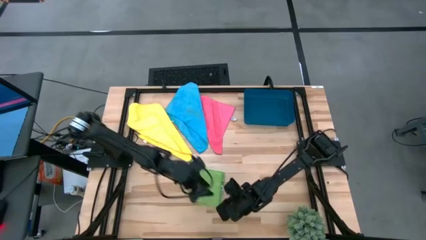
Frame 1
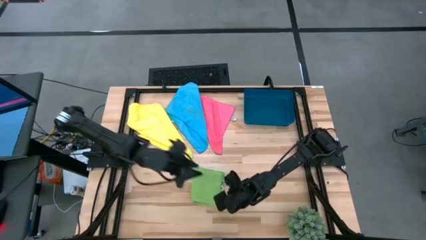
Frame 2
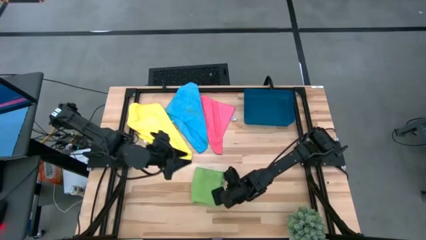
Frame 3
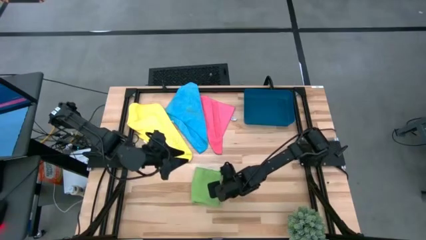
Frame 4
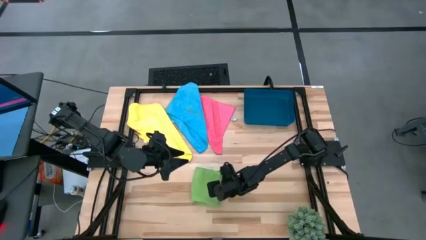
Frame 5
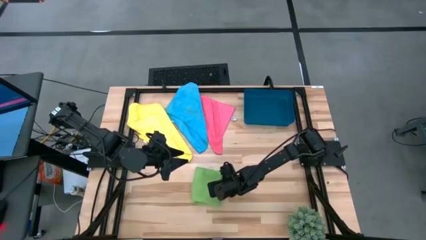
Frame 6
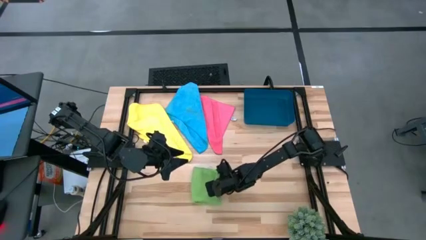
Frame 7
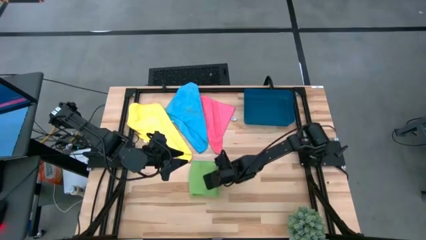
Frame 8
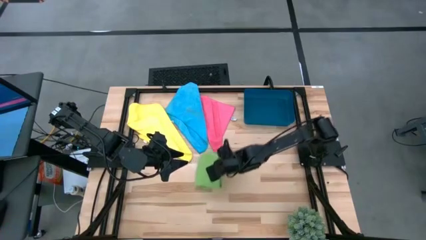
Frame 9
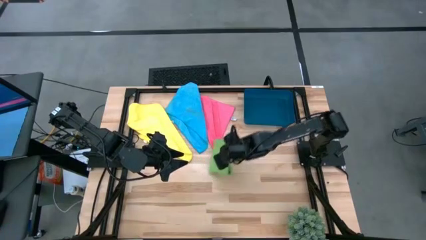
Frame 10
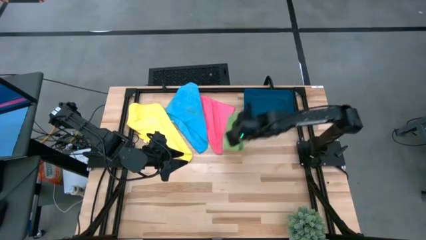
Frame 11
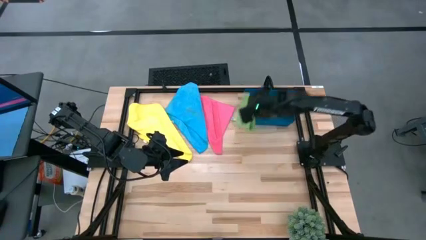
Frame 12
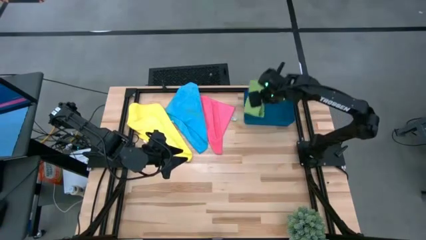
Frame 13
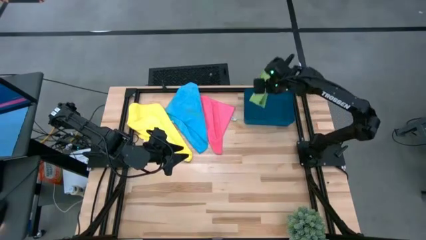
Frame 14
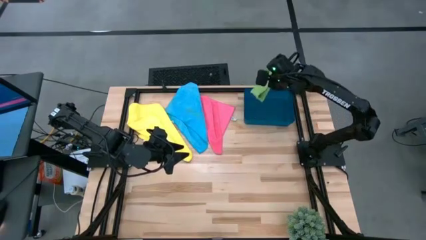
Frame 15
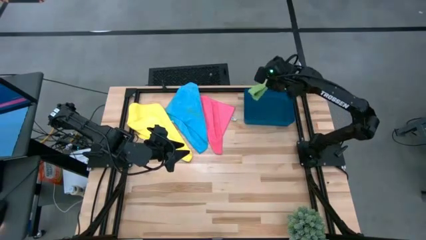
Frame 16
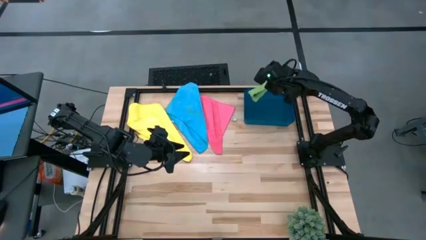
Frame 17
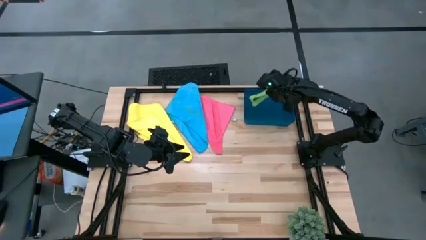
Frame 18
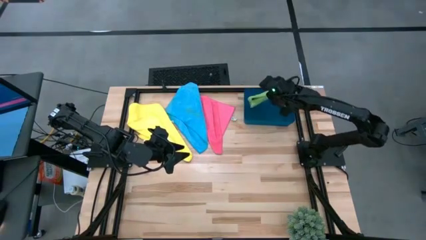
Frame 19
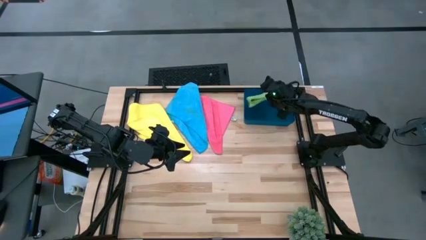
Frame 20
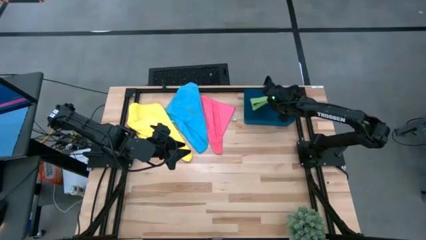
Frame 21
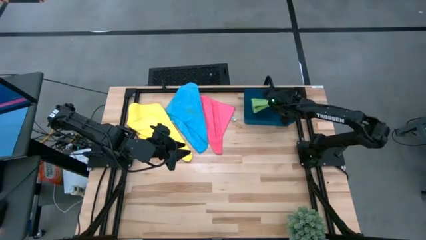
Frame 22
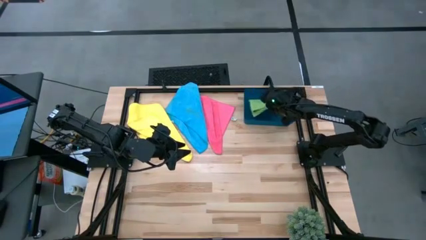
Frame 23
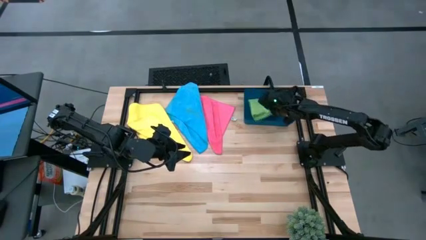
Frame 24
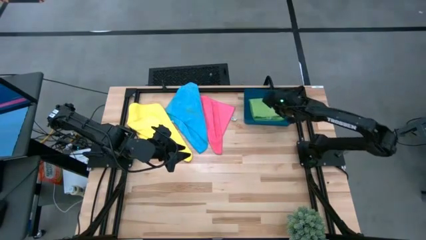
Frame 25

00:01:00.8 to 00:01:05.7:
Task: Fold microfiber towels
Put the green microfiber towel into the blue bin

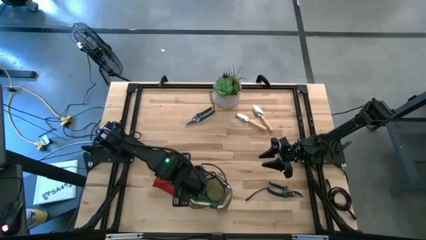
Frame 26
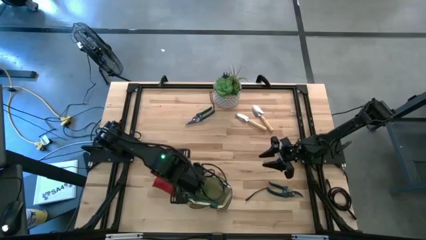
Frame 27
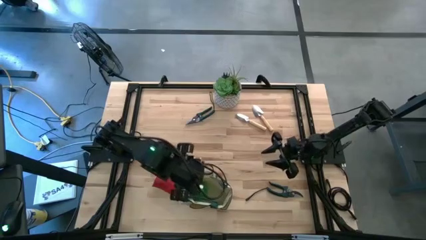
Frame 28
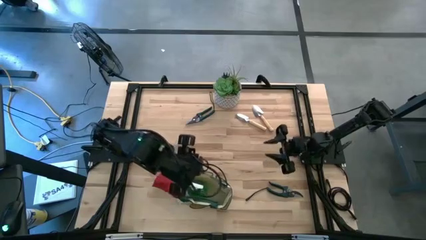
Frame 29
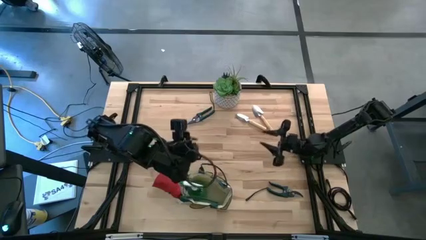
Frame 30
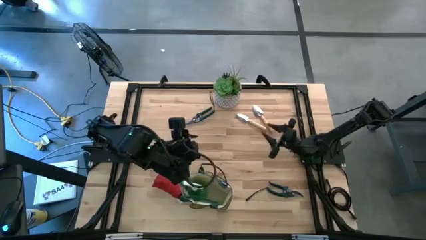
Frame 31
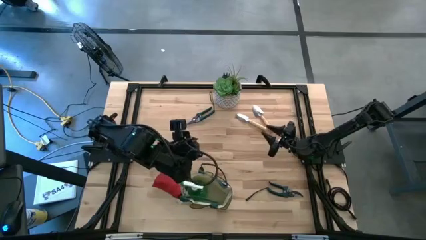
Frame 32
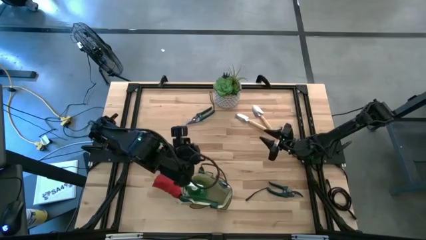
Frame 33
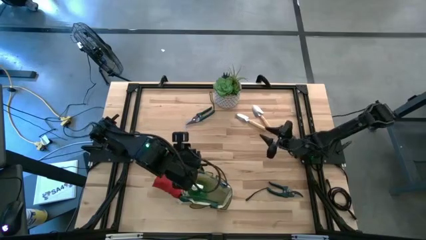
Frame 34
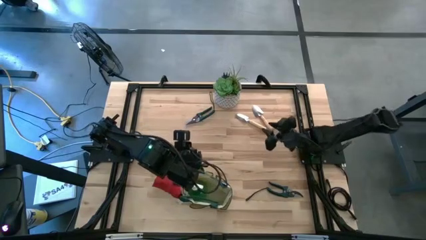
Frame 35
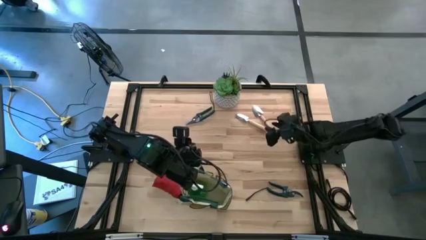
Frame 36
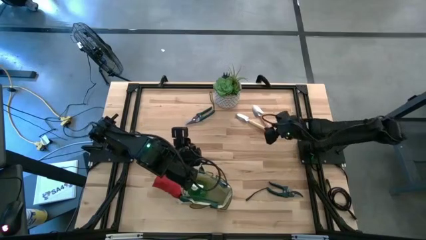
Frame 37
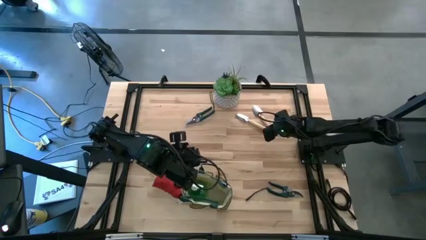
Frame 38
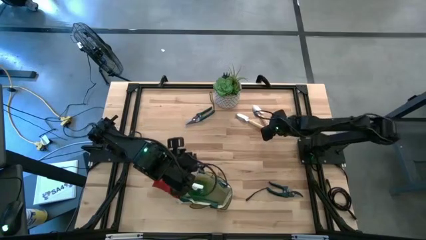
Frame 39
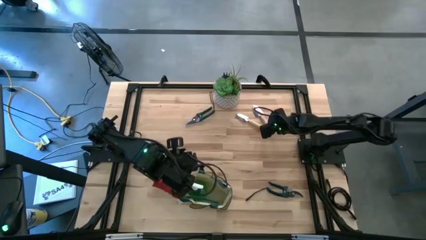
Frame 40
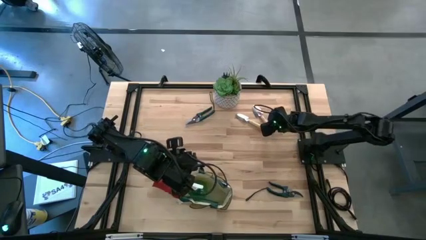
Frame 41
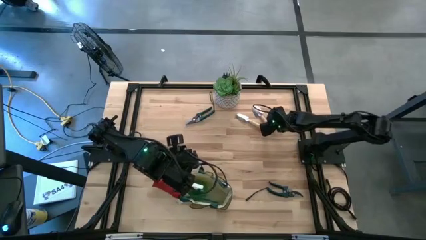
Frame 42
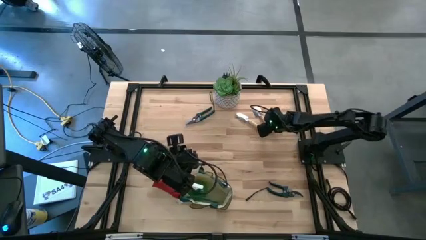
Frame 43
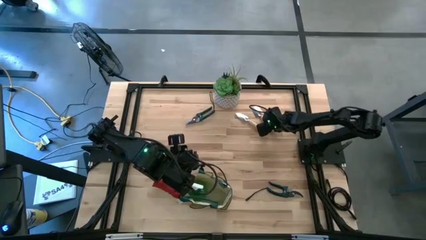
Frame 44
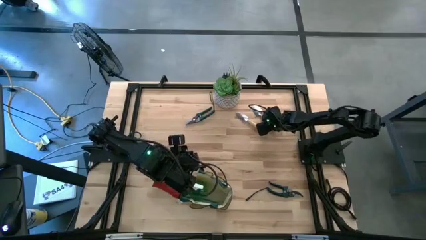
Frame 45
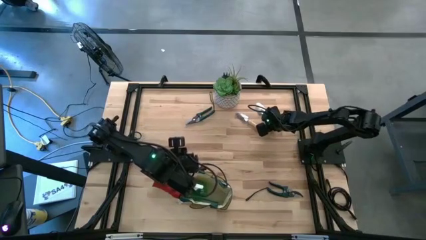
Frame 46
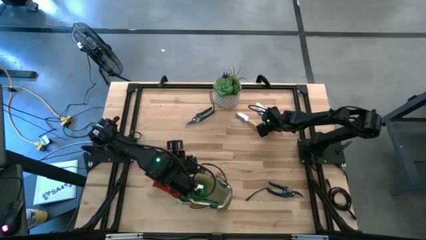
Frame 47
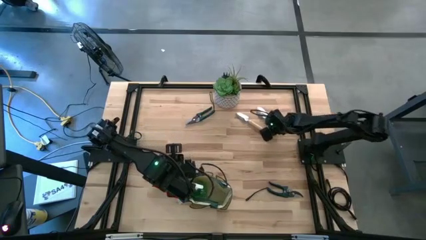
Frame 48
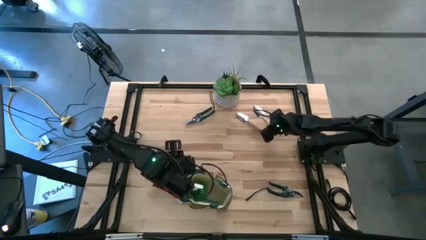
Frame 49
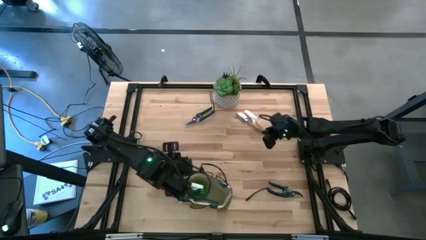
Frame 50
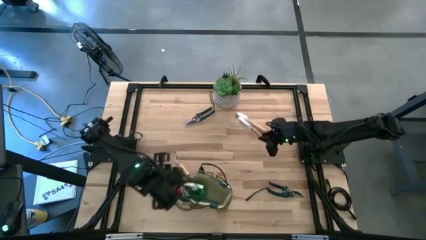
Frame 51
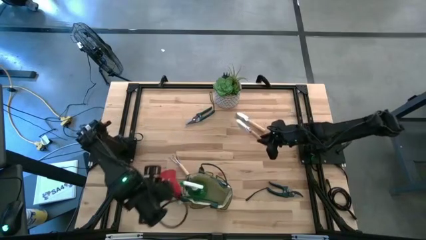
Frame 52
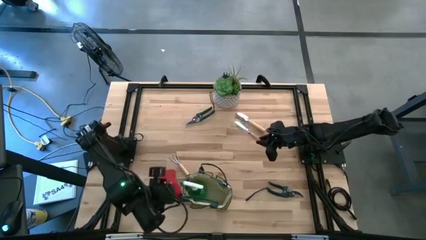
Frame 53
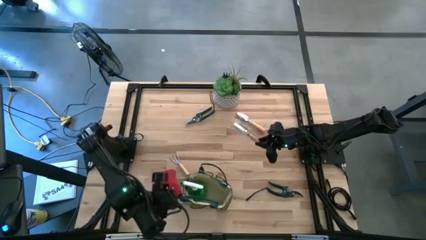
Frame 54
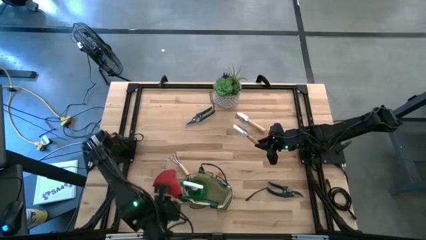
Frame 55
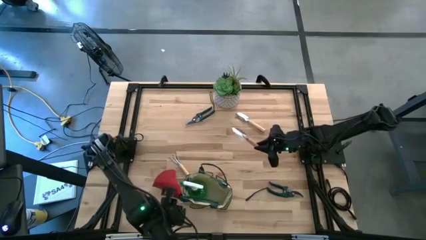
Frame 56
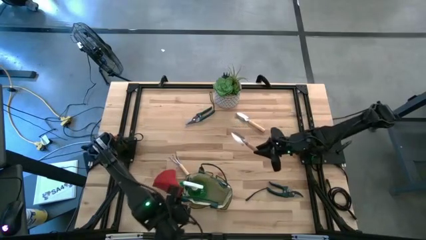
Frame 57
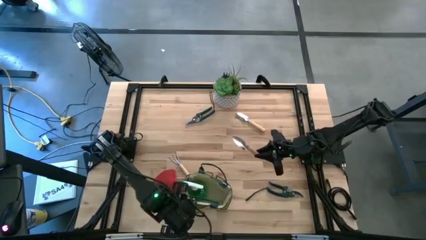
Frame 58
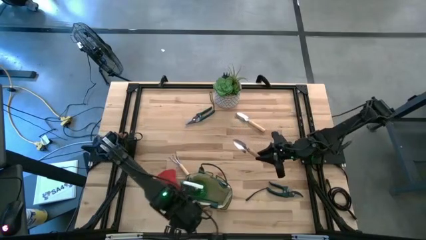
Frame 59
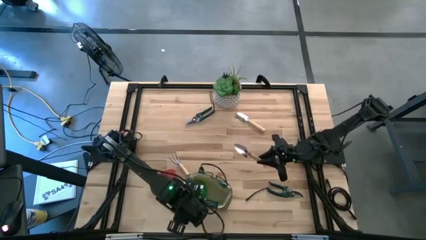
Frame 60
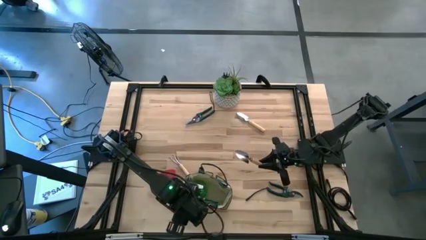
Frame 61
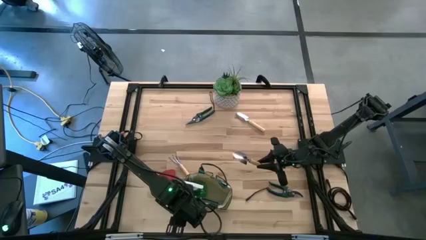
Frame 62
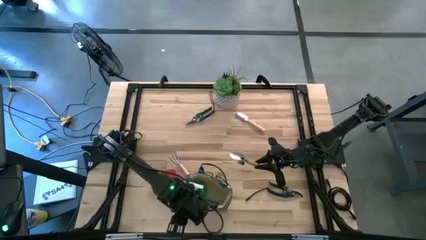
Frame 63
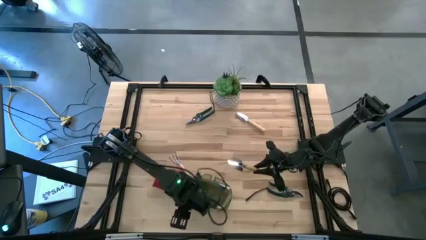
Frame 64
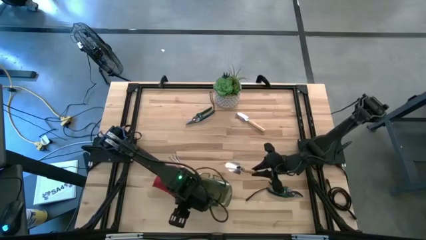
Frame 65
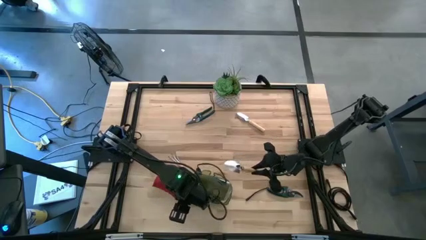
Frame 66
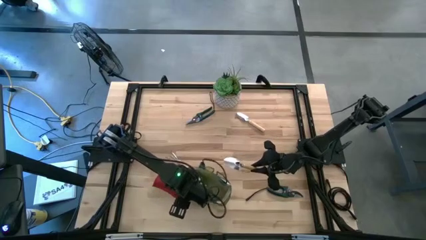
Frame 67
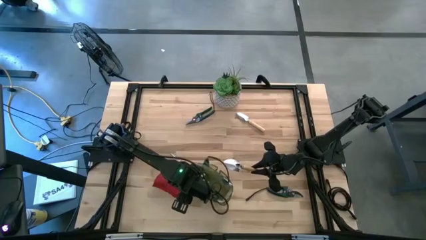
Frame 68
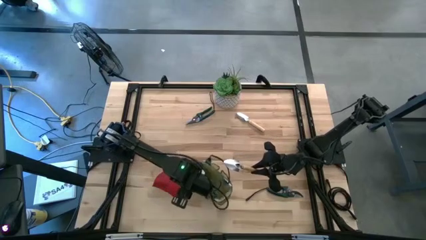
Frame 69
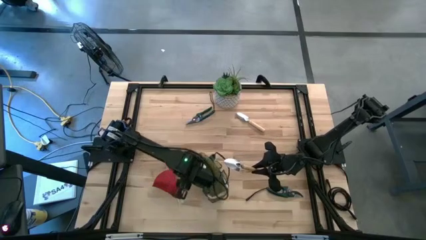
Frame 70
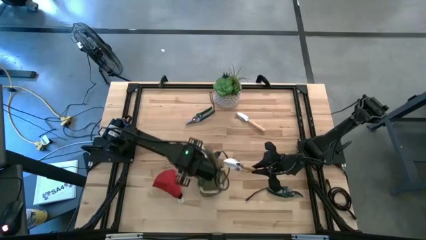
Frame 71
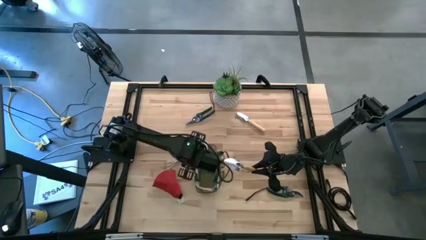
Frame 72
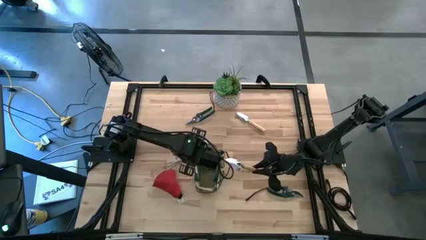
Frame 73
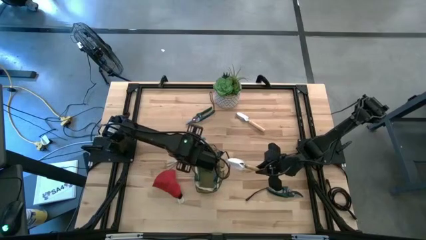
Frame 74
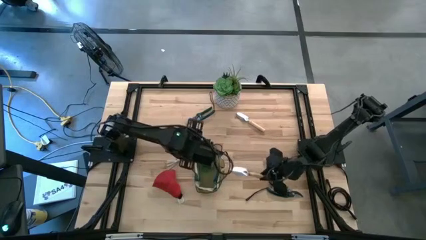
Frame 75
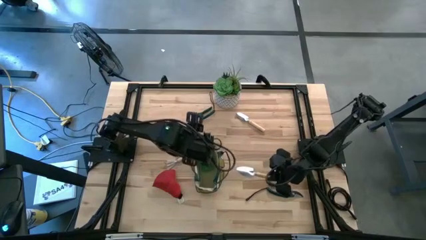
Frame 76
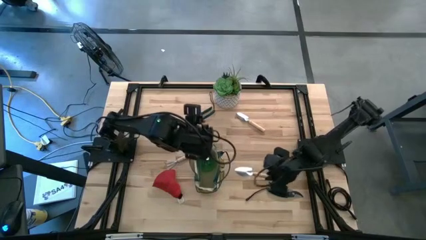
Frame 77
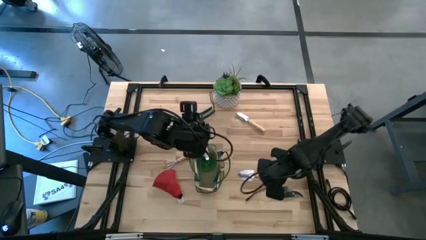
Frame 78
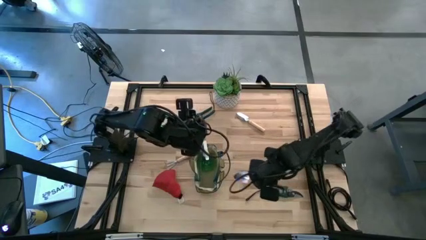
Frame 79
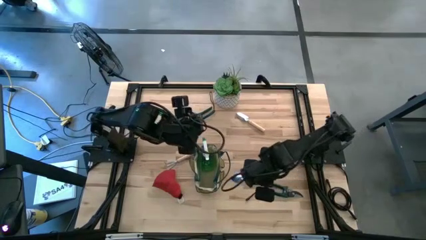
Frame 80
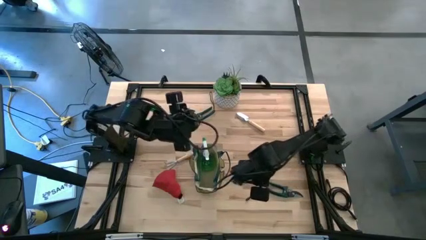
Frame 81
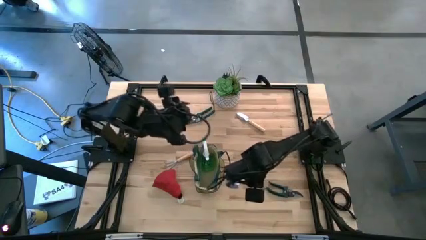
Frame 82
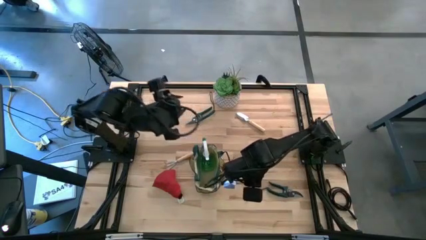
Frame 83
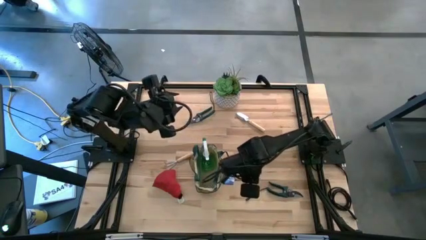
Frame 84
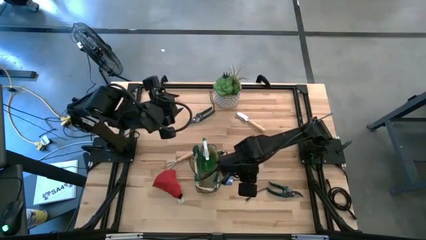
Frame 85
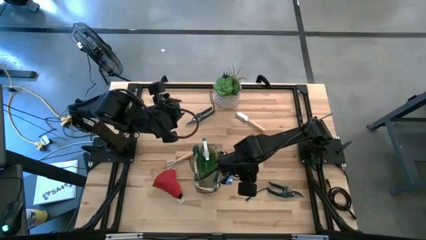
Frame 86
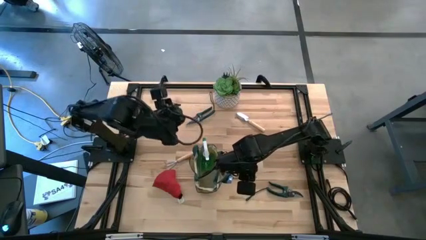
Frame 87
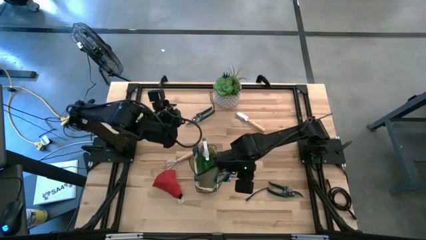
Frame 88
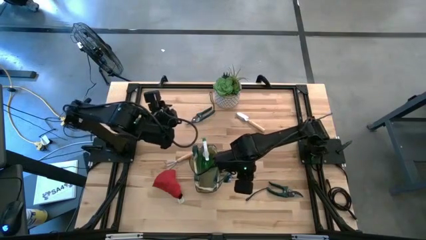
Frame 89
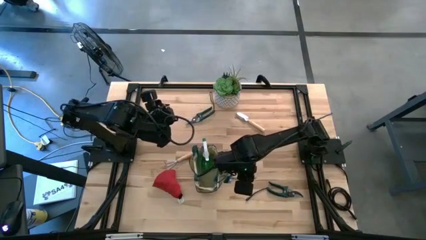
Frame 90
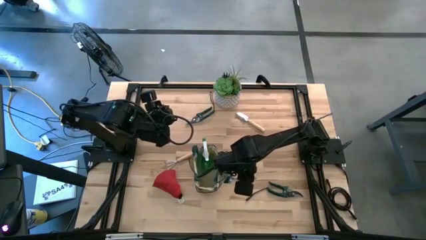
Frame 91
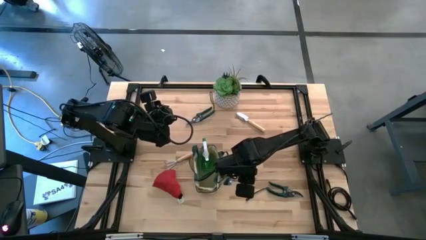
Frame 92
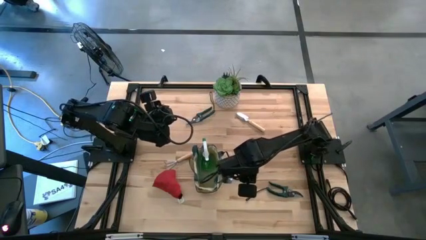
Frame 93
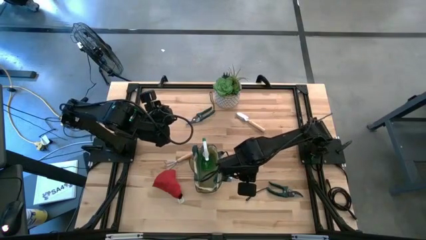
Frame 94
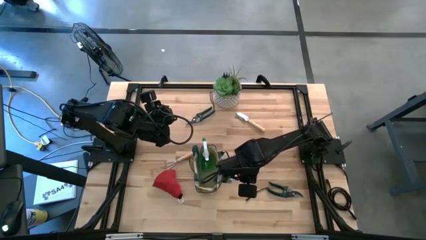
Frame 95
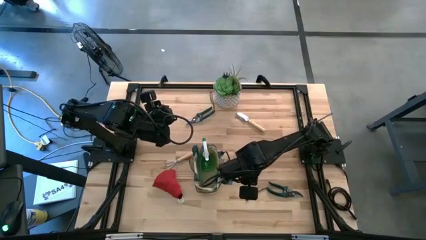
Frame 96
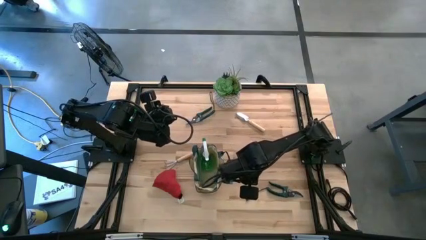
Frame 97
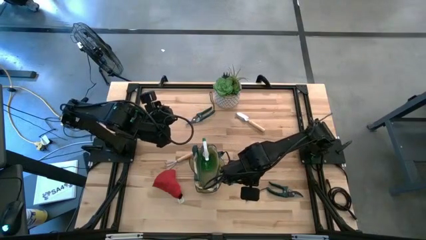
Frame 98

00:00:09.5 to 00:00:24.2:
Task: Pick & Place Garden tools in Gardening bag
Put the right brown trowel into the gardening bag
